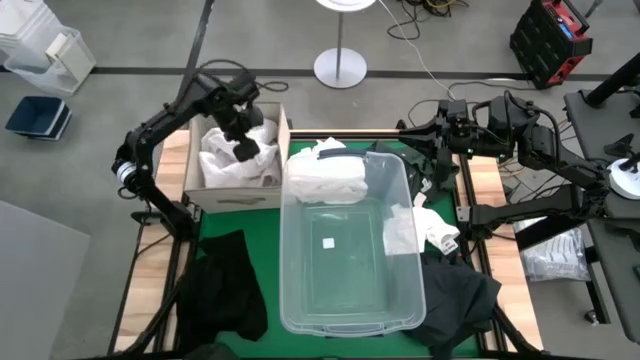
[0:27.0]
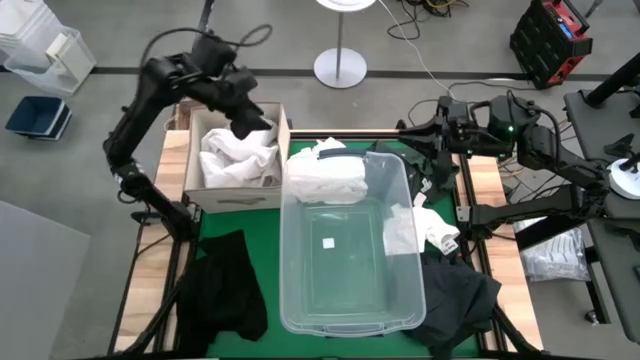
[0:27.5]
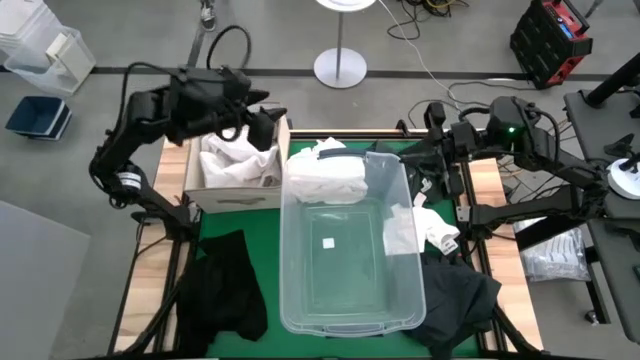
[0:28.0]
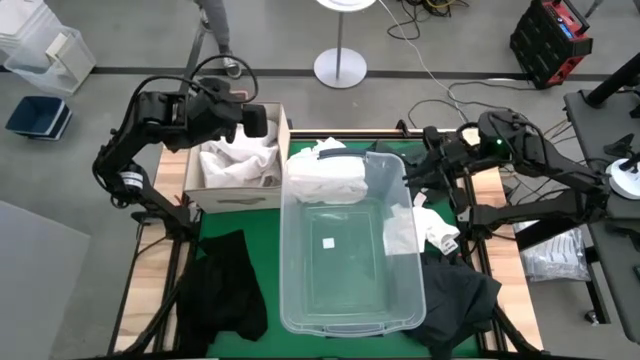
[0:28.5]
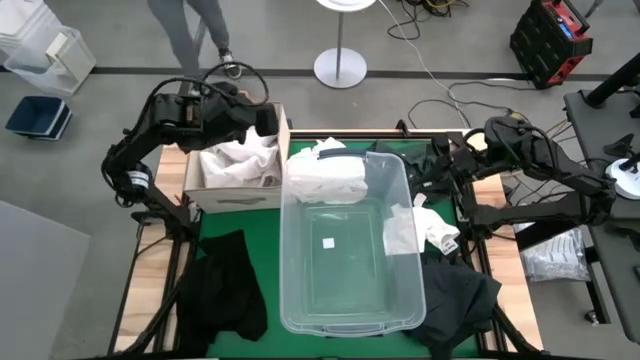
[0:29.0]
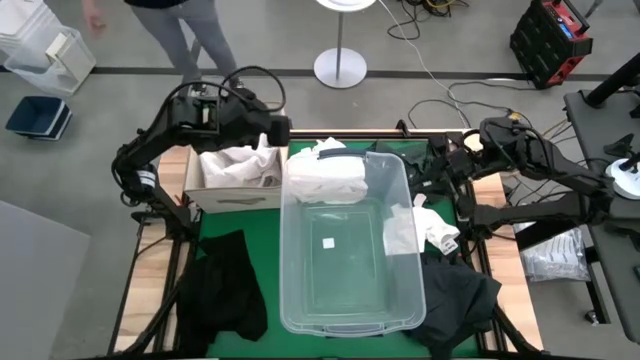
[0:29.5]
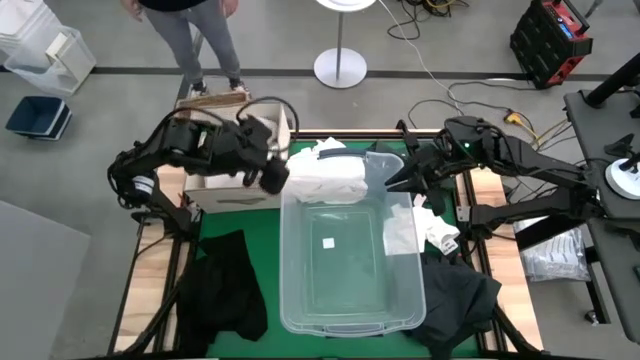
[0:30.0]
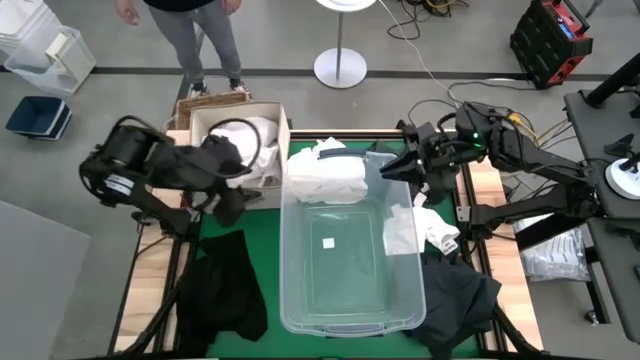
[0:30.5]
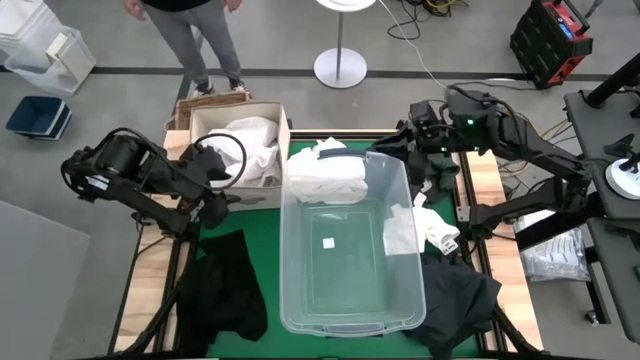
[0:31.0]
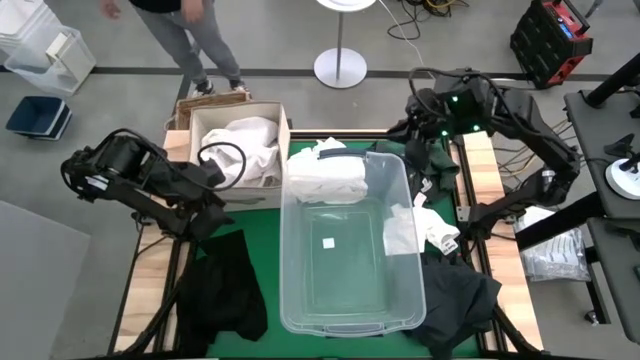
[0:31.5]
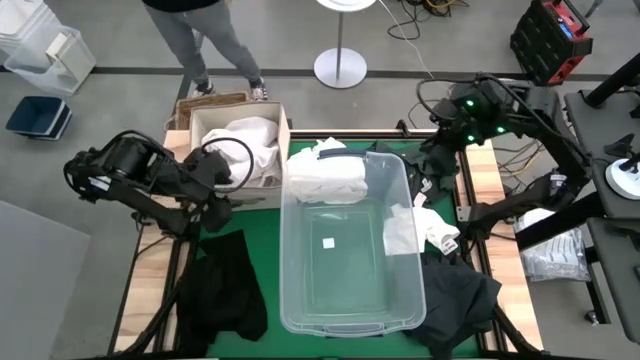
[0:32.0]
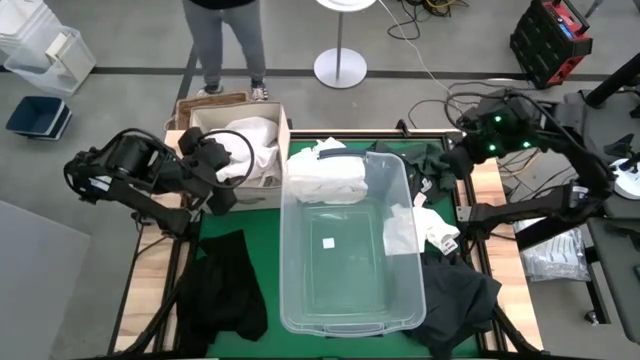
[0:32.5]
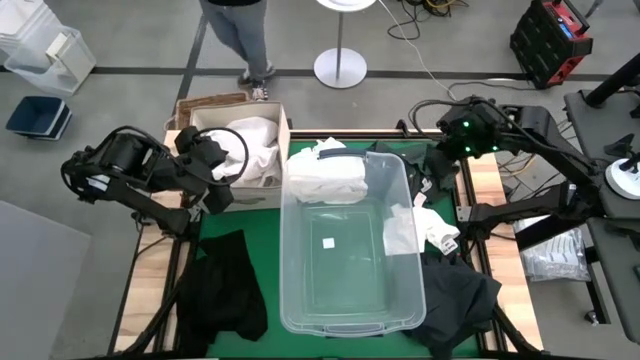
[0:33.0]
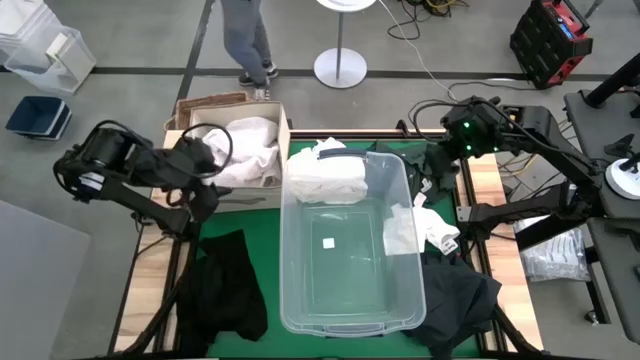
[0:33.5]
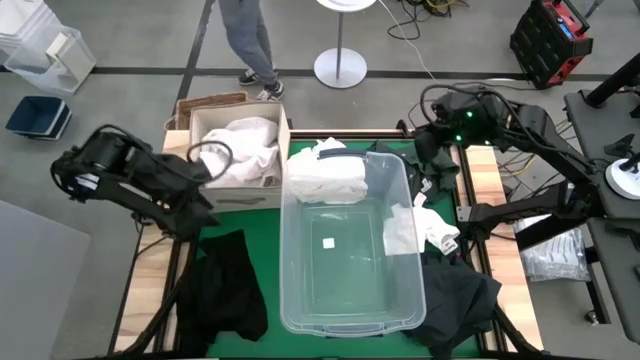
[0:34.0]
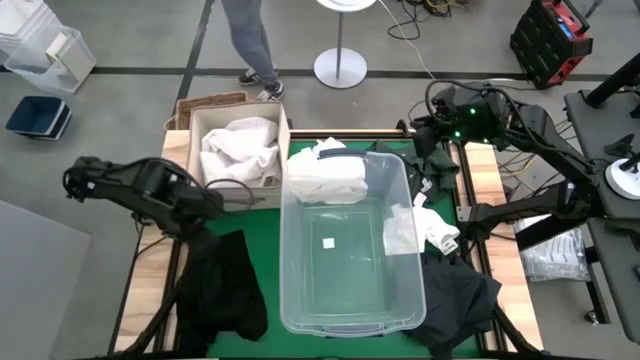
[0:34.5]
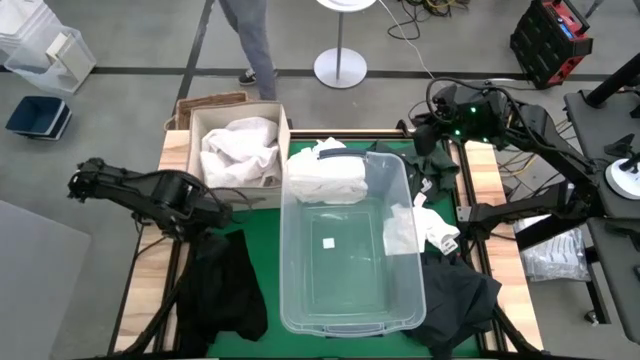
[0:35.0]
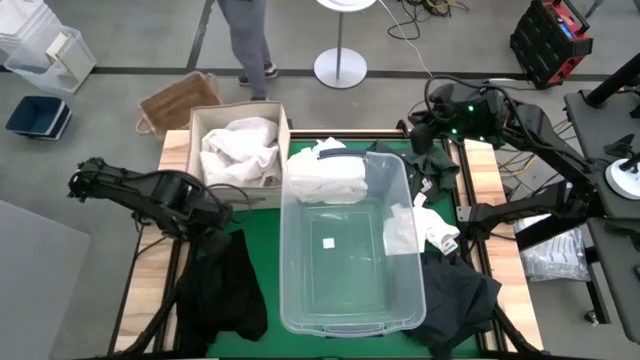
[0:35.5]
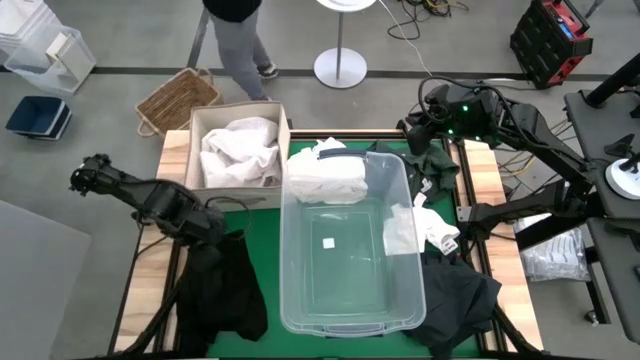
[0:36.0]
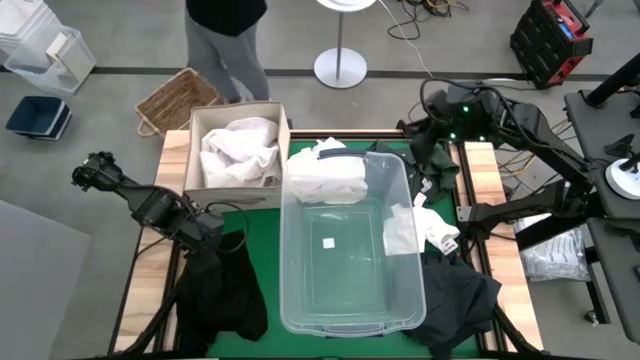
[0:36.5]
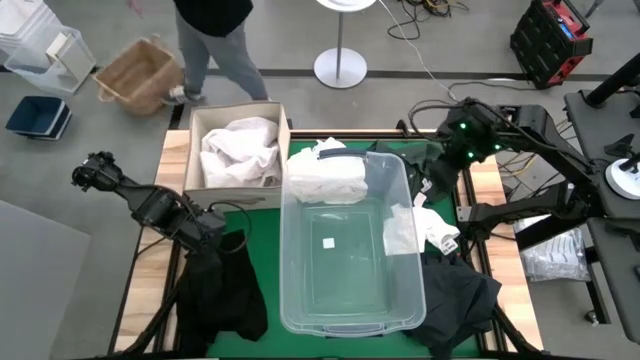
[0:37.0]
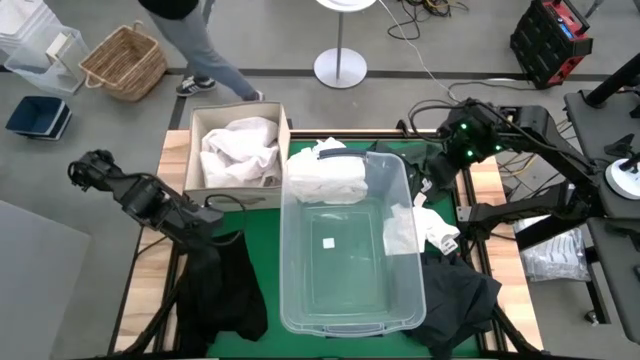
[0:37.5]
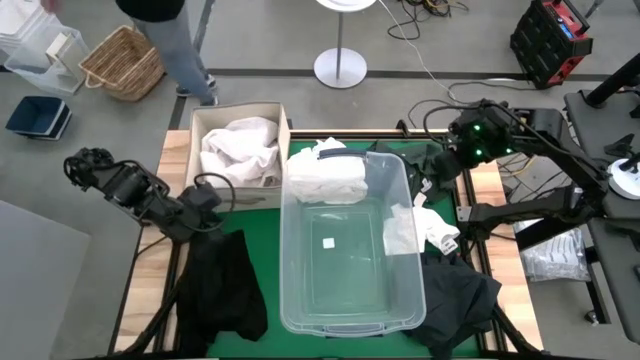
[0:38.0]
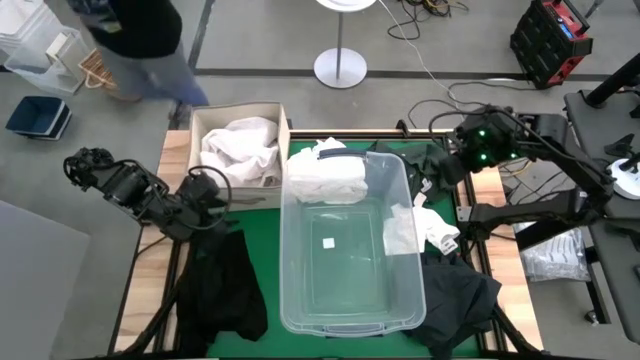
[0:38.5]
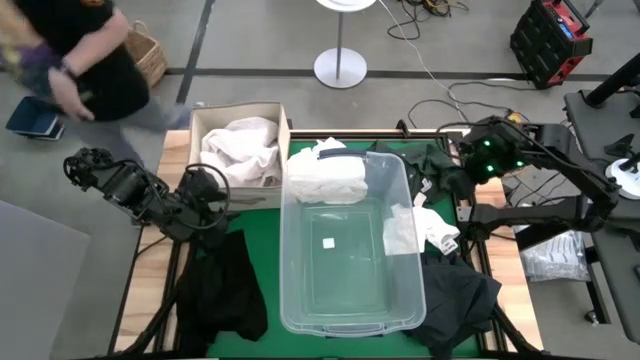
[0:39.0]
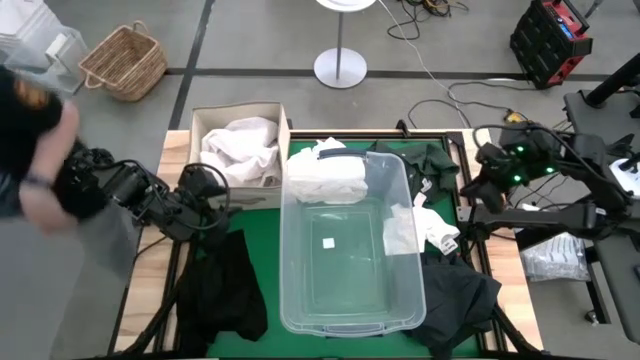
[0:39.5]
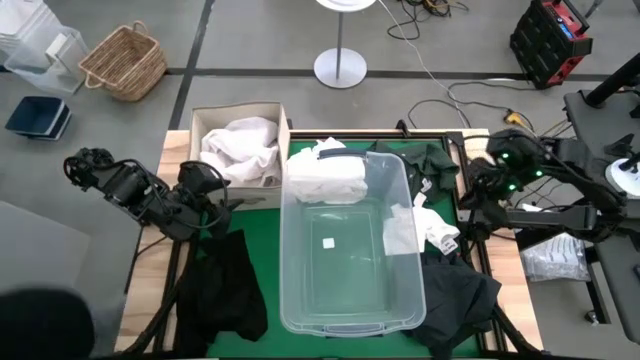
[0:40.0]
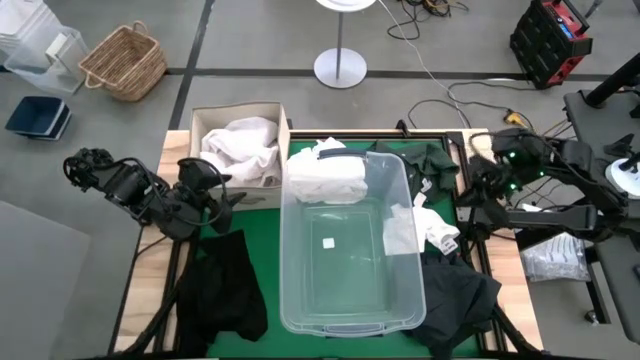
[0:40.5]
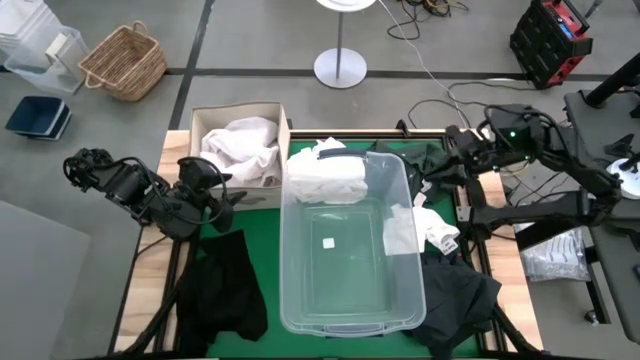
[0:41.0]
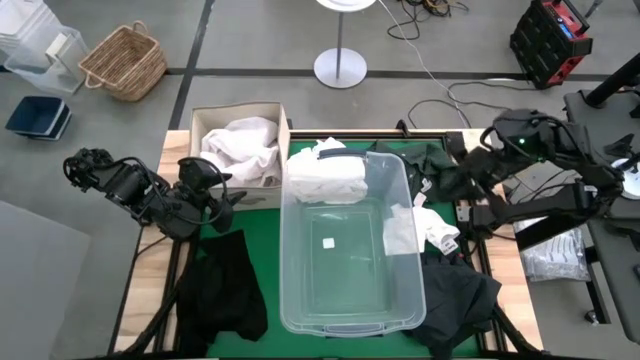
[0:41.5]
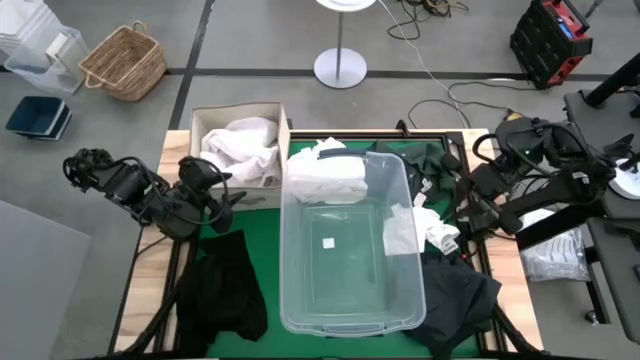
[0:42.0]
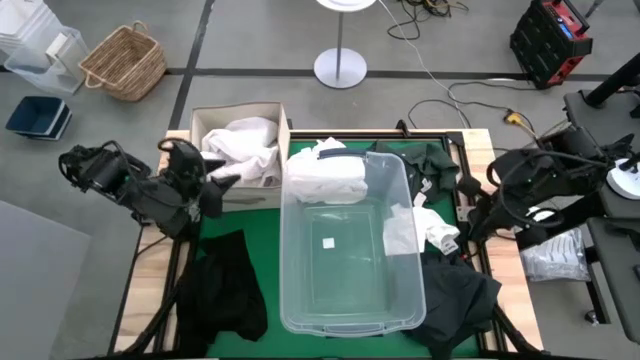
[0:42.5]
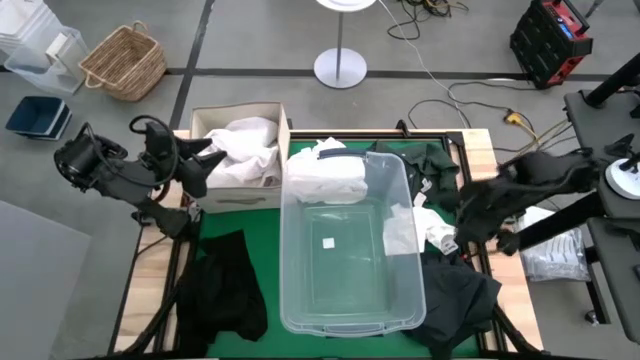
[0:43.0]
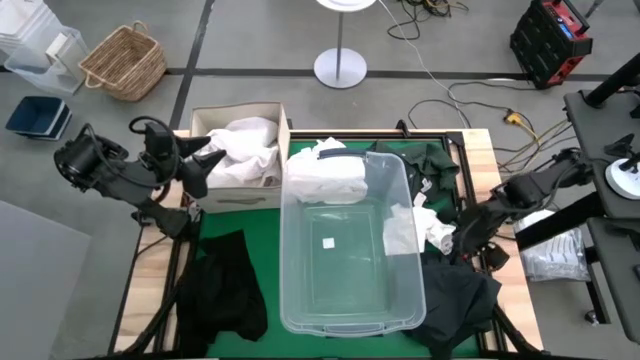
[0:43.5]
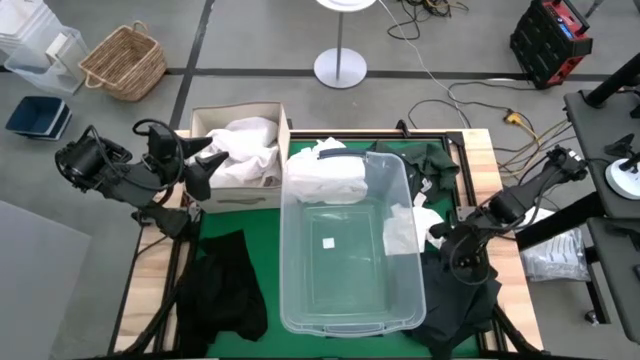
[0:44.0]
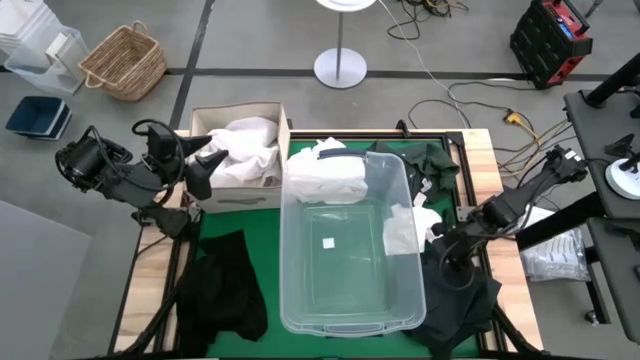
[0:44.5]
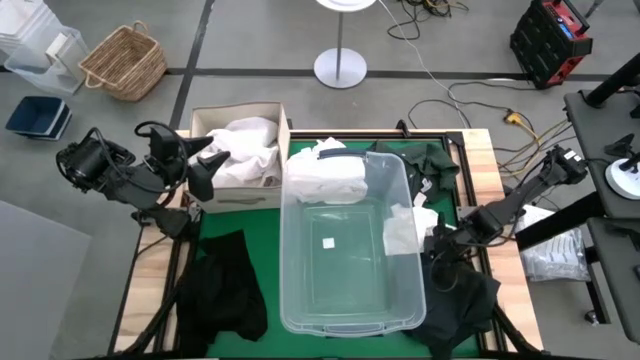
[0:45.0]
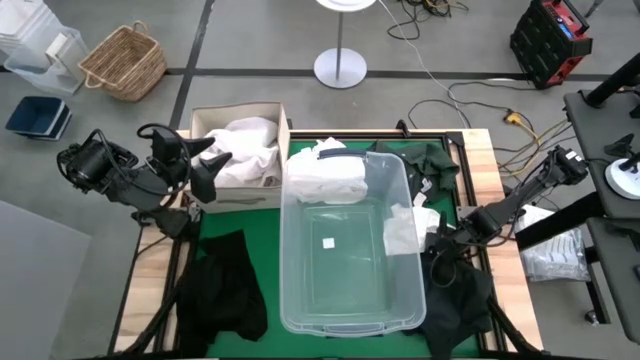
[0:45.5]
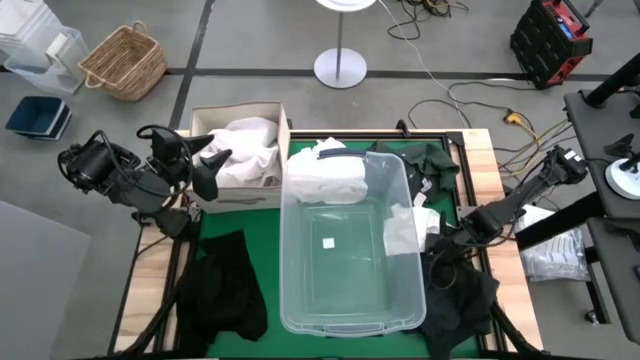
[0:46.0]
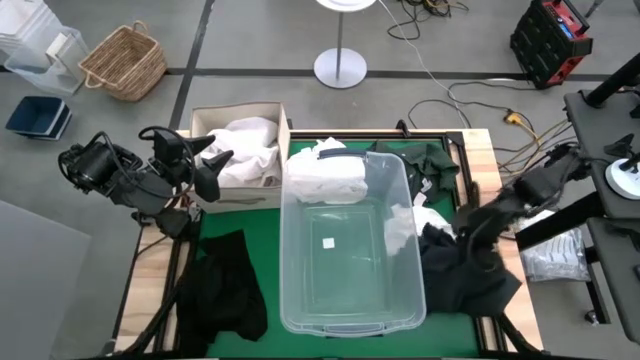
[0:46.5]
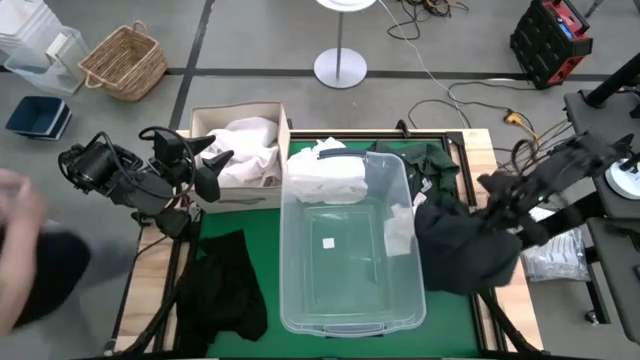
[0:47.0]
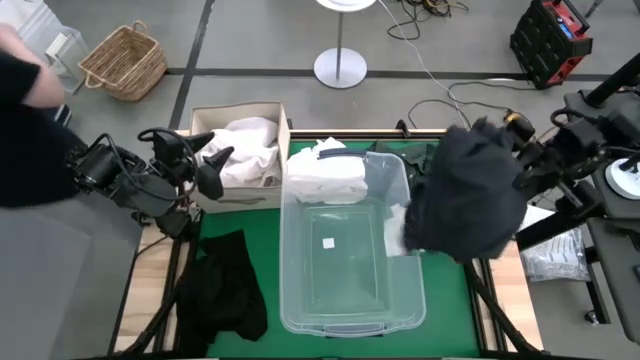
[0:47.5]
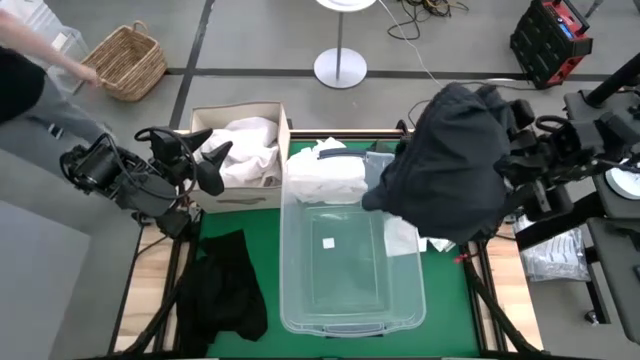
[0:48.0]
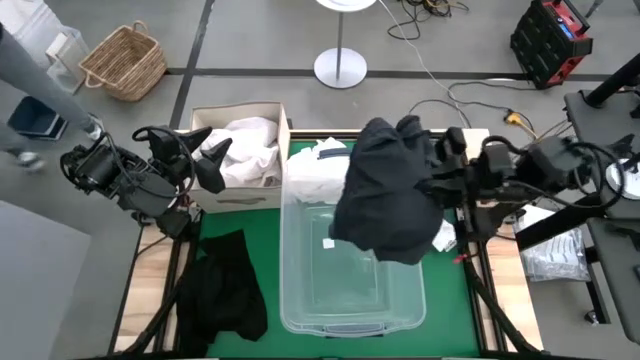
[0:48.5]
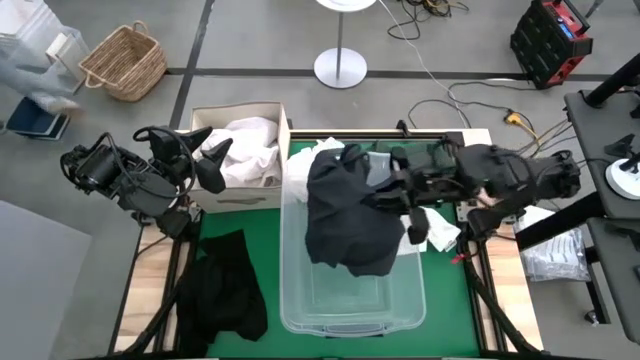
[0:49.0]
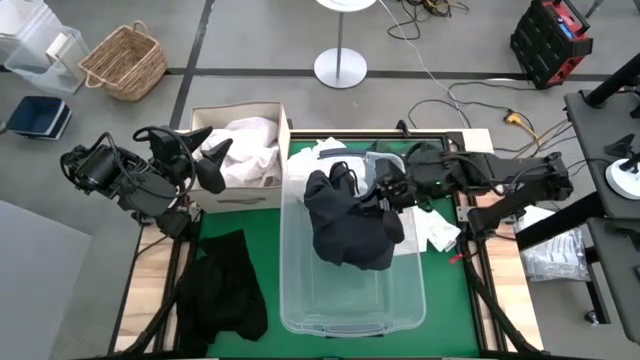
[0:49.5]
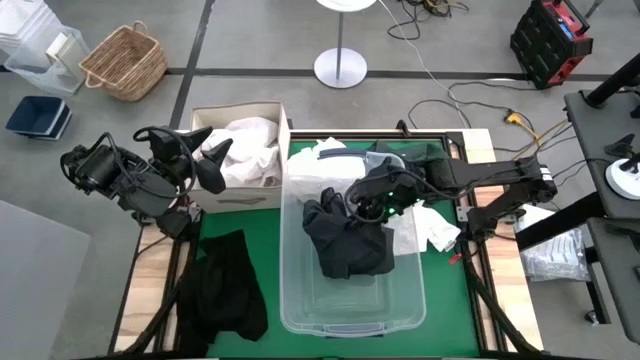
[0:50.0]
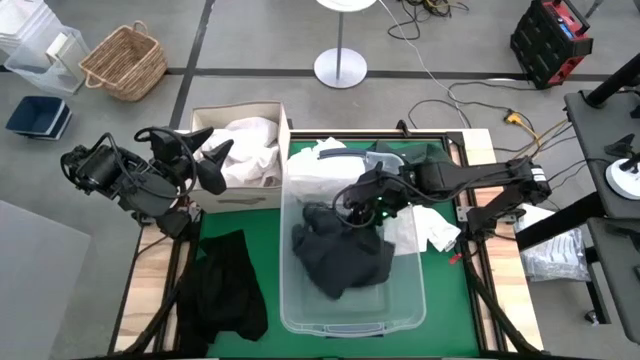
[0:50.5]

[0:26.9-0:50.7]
Task: Sort clothes
Put the right black pants into the transparent bin
